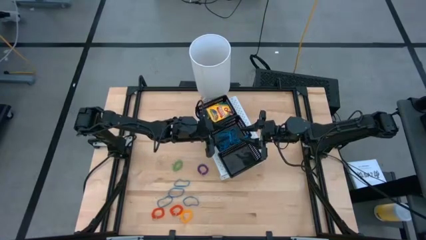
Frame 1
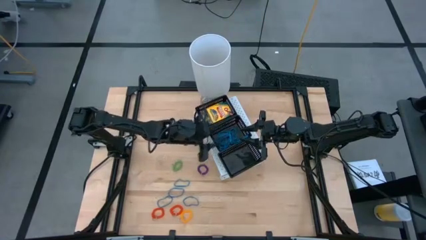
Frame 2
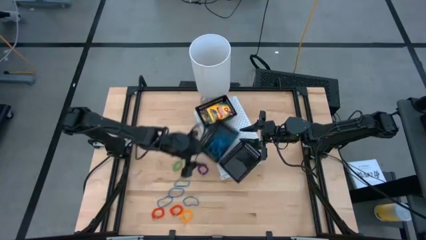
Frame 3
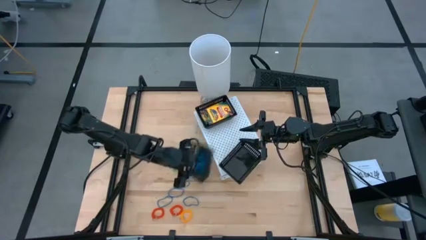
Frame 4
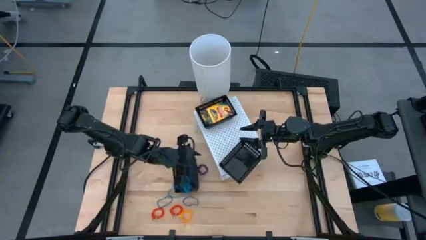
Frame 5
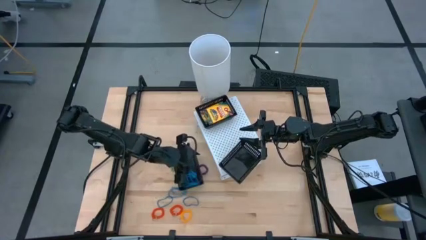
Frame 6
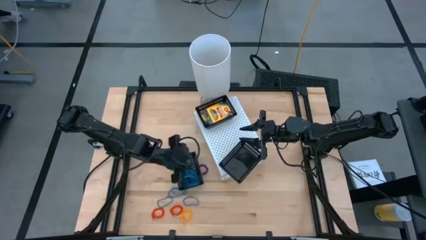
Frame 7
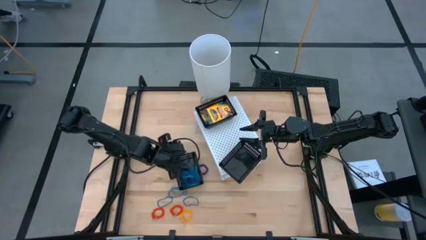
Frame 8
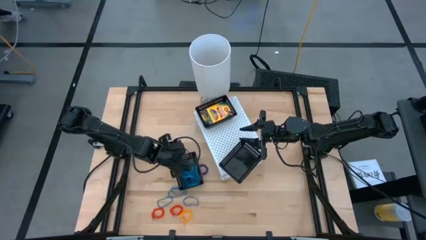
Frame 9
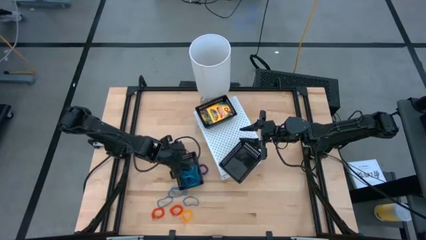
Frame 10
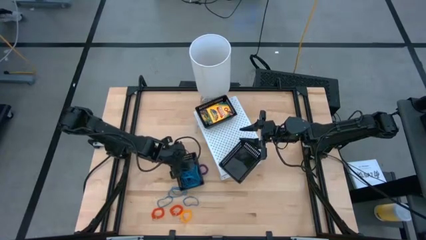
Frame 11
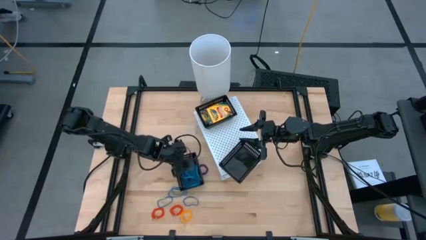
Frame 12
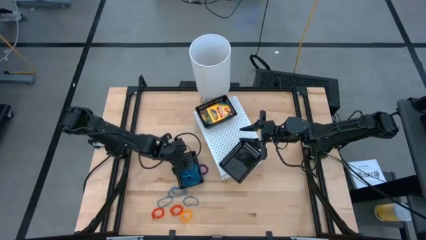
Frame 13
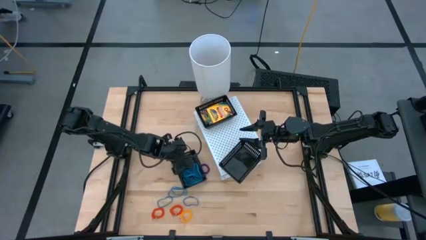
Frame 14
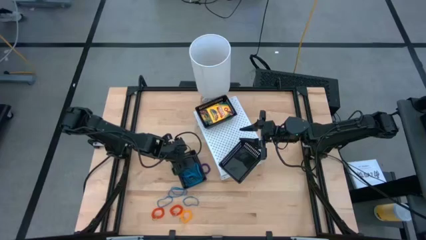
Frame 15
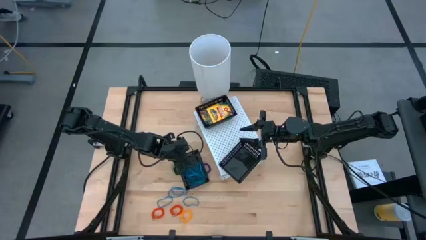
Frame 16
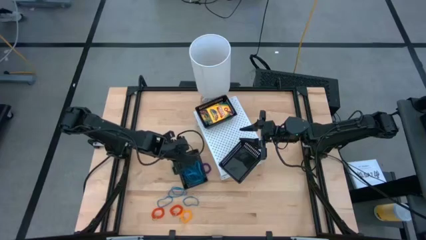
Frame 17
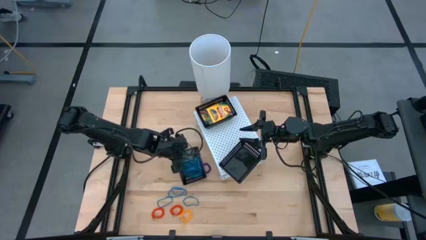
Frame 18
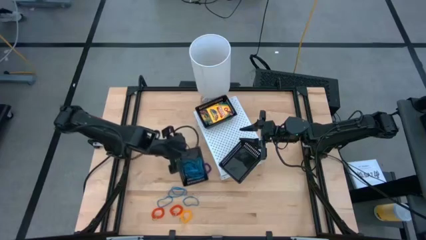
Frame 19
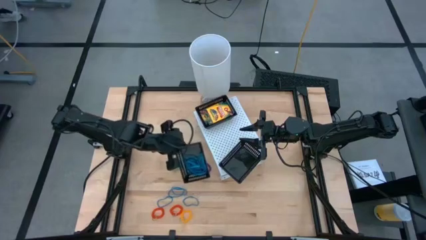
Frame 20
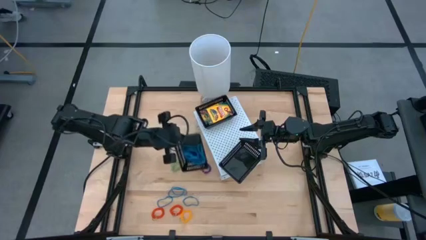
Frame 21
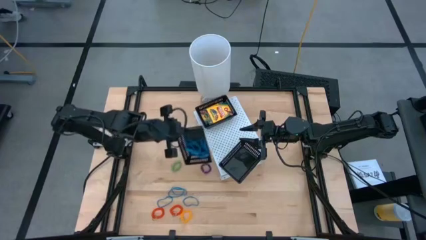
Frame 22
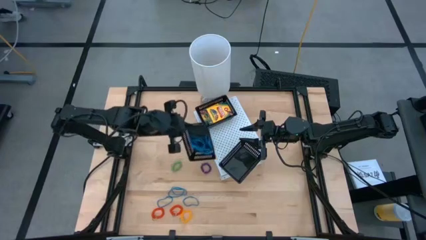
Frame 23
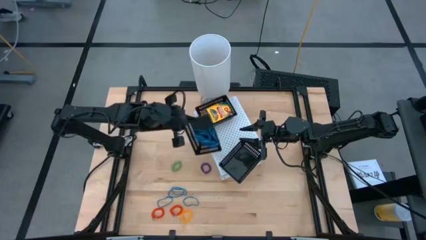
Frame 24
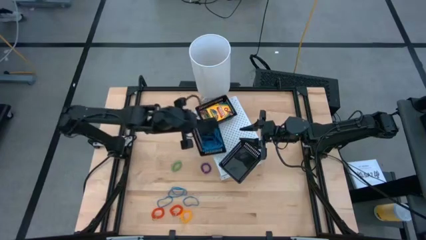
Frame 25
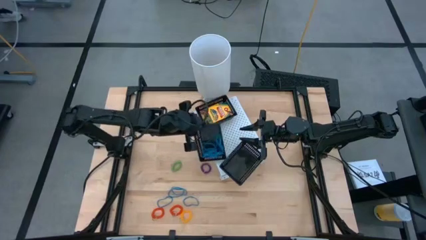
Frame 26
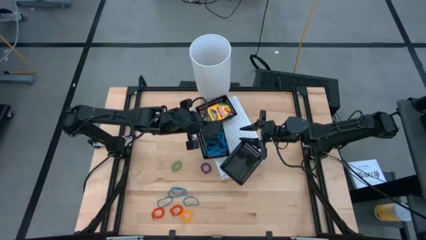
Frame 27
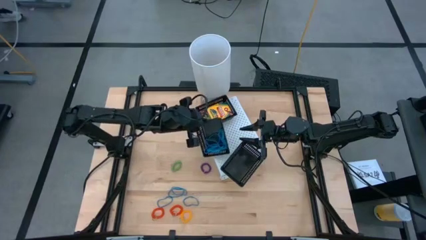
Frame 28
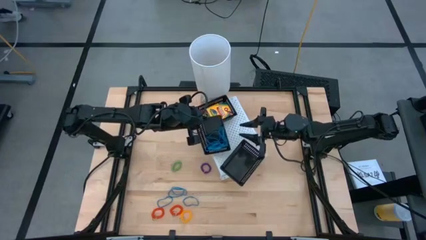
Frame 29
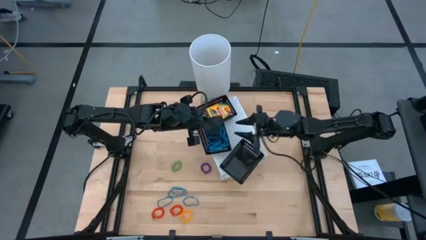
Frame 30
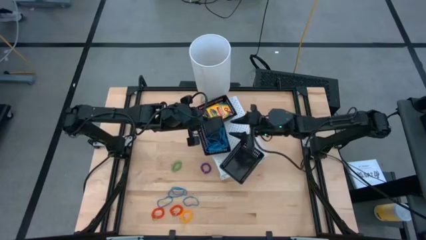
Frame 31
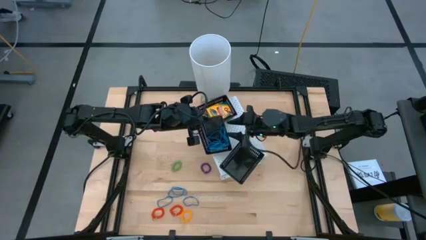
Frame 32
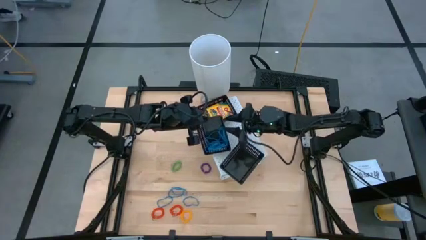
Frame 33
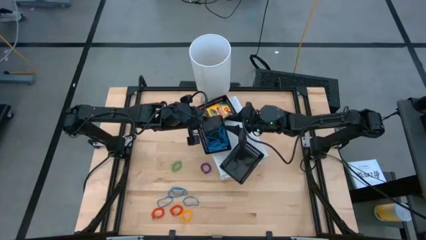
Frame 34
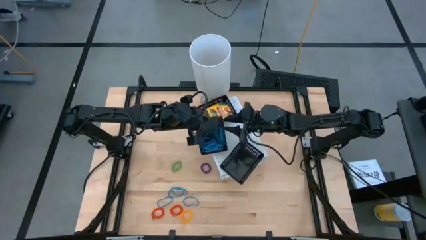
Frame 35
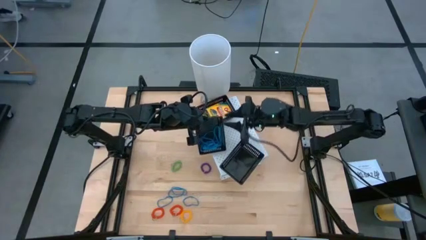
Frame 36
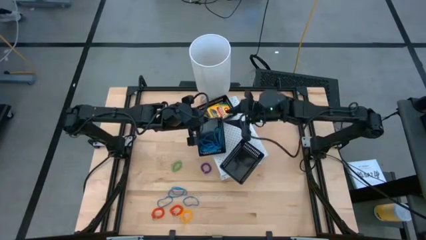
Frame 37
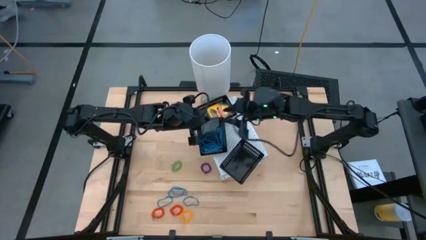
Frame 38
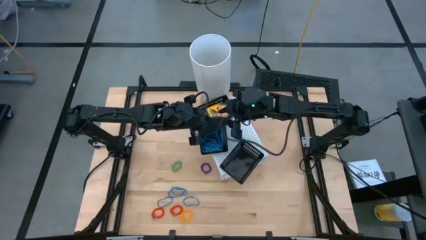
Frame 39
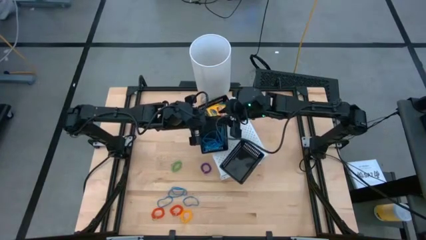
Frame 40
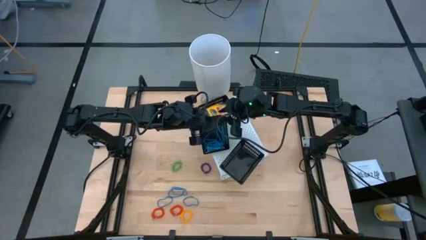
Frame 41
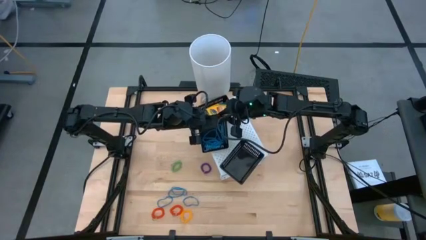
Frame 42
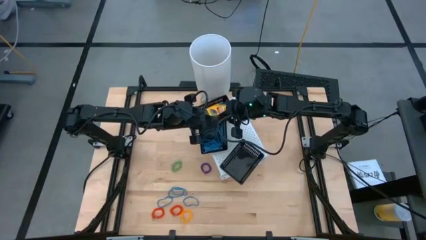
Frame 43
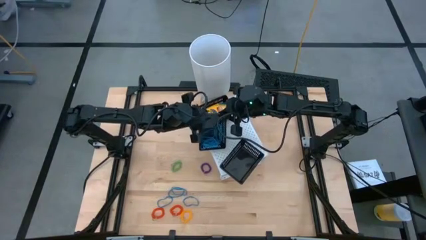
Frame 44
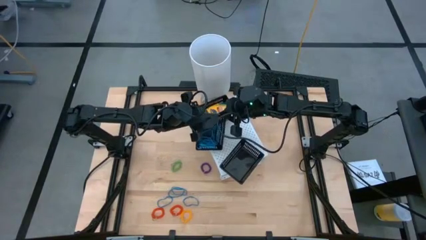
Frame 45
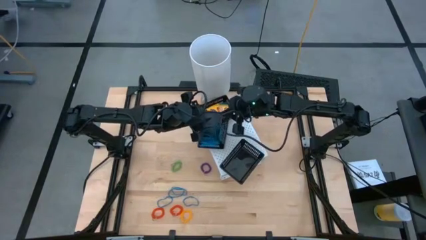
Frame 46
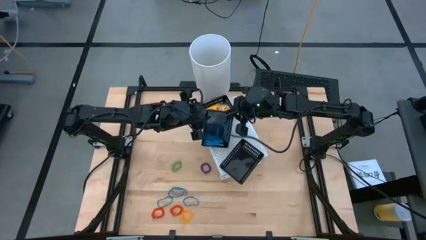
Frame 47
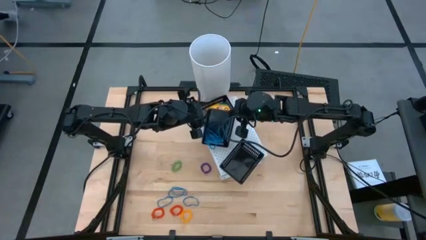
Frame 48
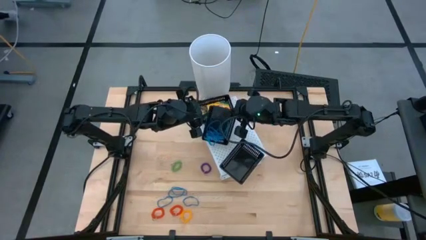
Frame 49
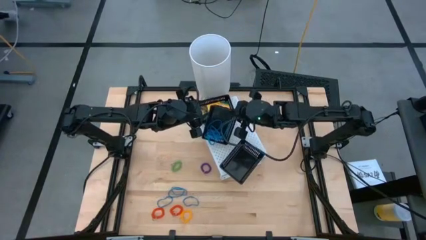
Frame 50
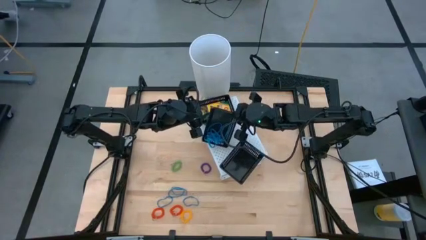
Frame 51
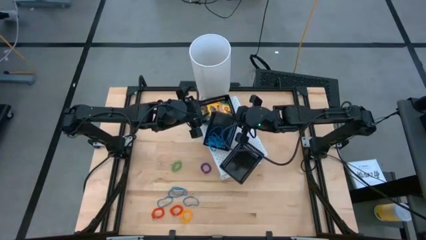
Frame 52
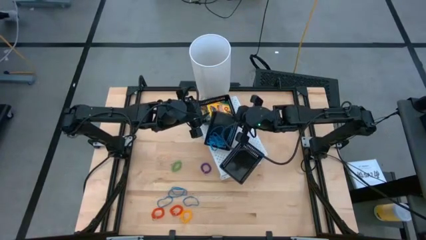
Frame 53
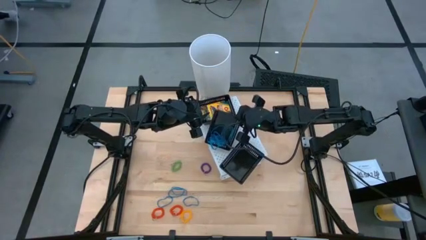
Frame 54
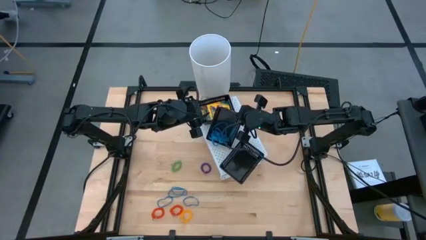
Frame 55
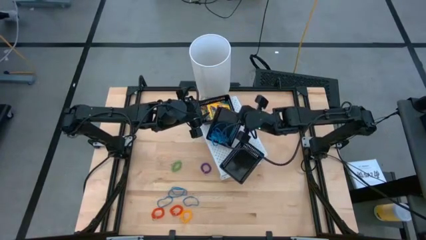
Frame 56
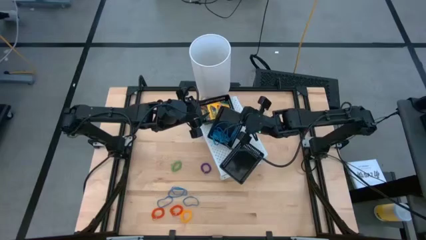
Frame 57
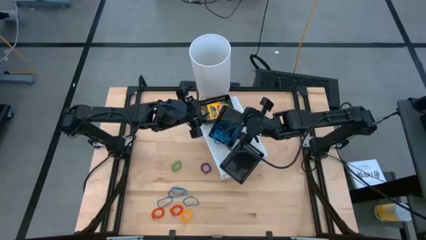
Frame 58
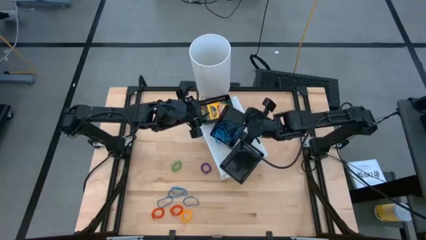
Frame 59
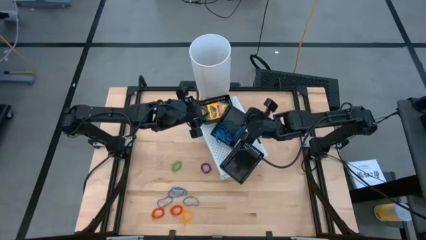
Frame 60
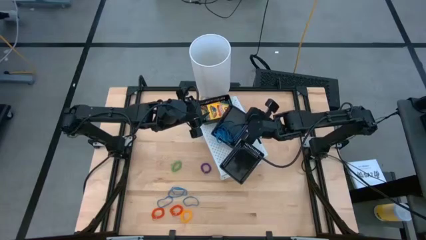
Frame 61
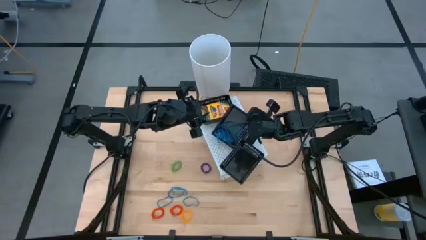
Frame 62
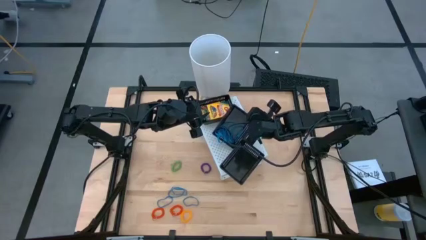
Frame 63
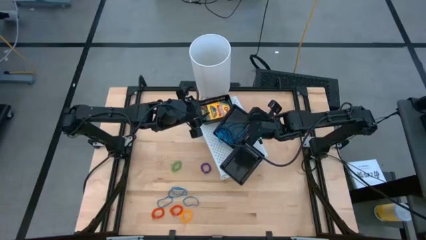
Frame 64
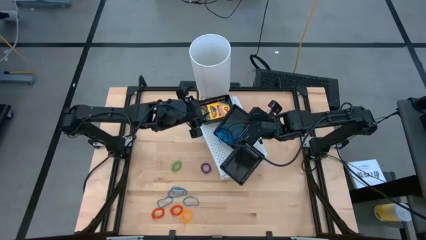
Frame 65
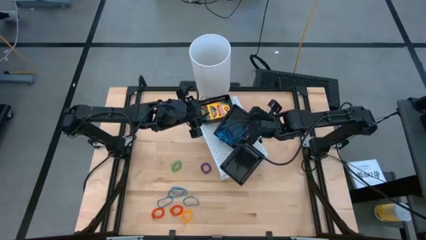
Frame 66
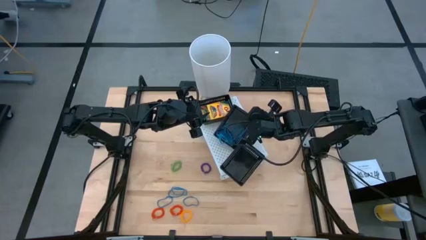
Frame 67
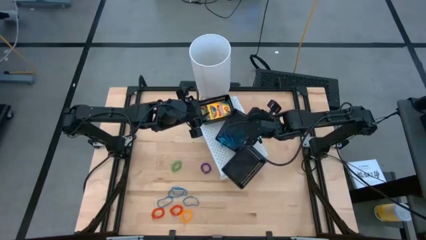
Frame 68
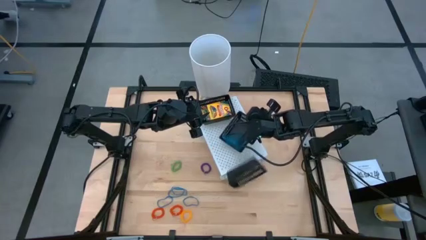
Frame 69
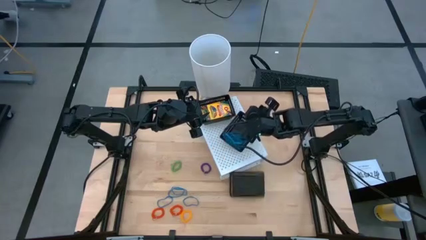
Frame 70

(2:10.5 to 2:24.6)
Task: Pick & Place Office Desk Supplies
Put the black bin on the shelf

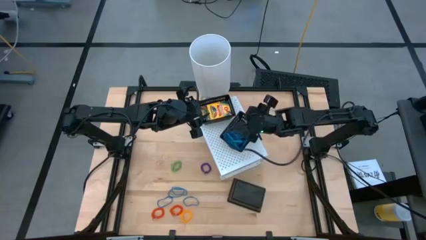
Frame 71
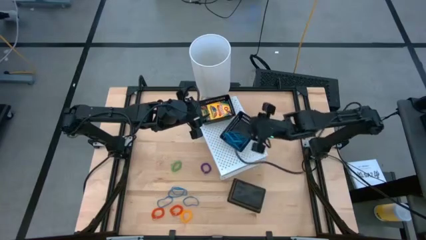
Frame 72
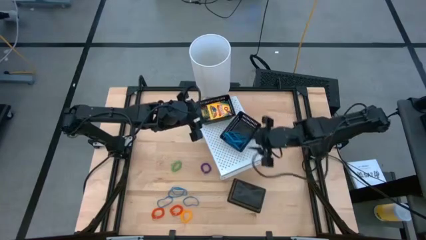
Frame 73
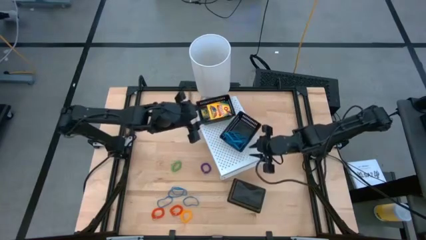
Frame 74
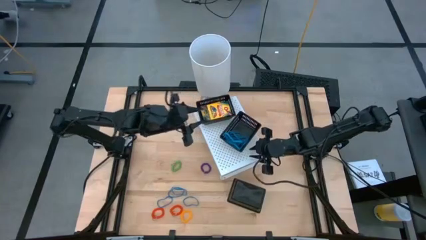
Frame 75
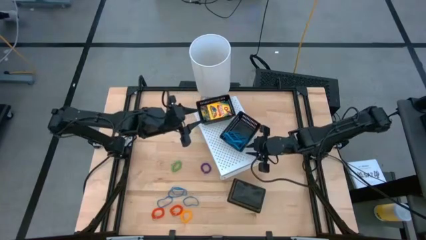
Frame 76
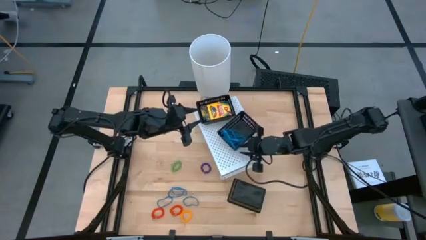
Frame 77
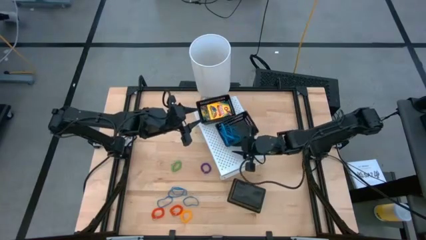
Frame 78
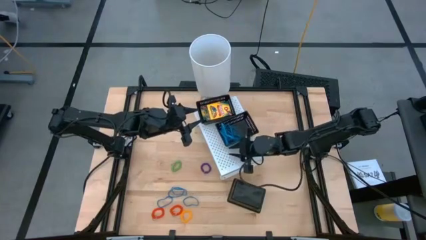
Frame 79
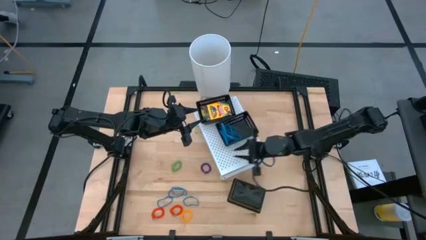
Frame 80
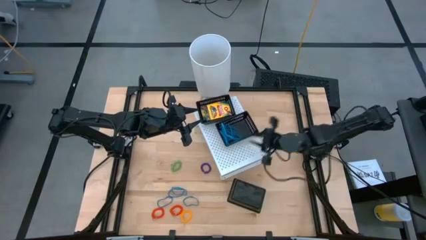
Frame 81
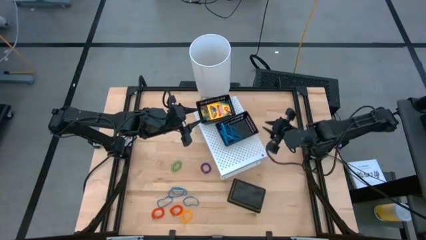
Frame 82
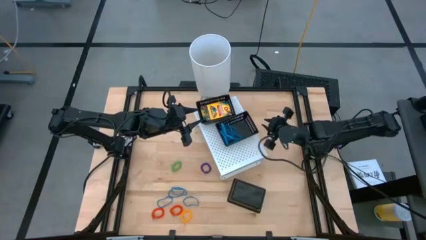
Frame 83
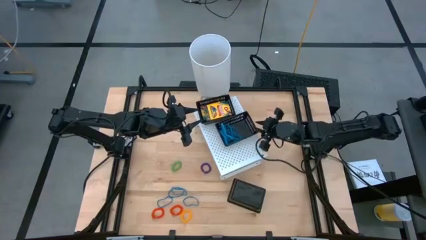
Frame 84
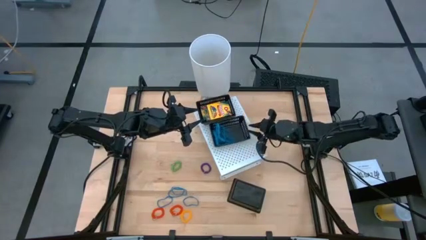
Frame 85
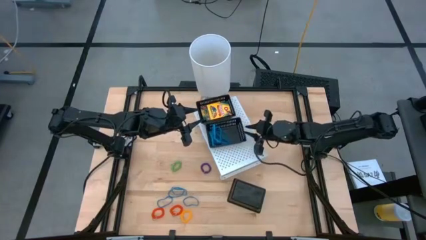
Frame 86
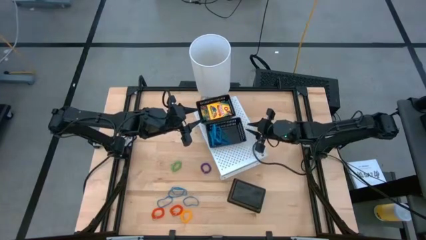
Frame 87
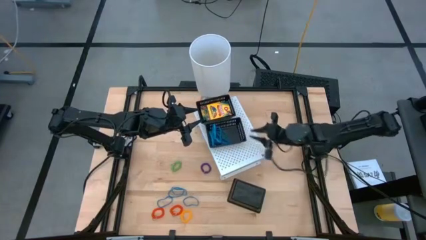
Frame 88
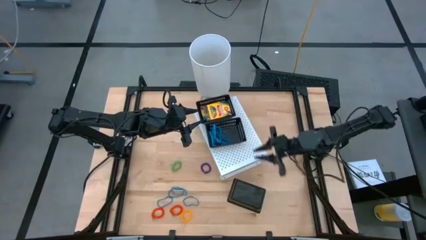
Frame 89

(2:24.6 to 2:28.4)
Put the black bin on the shelf
